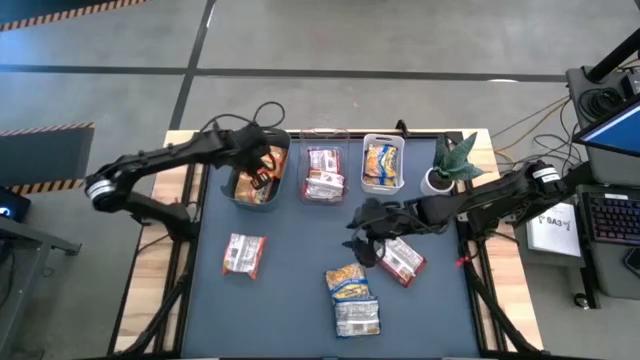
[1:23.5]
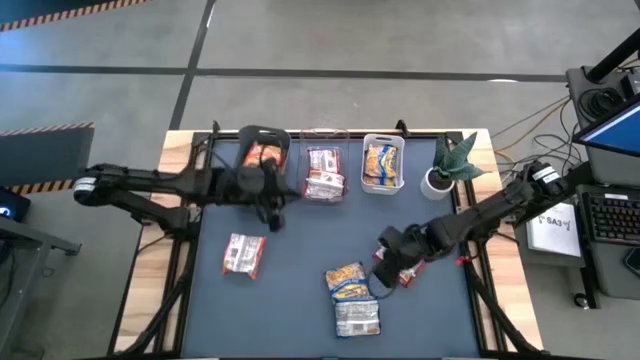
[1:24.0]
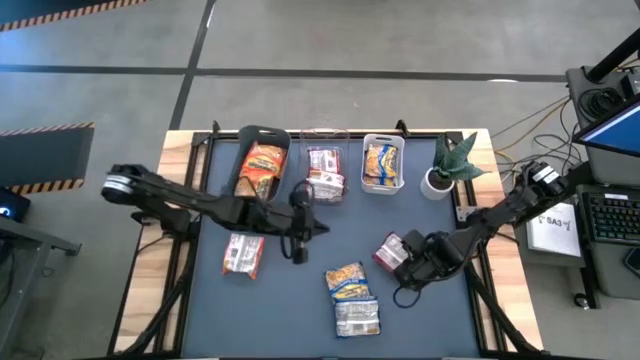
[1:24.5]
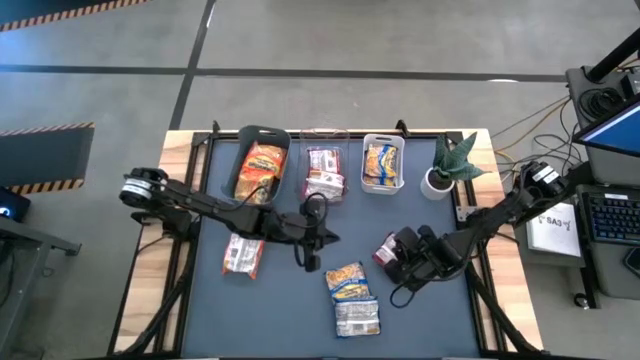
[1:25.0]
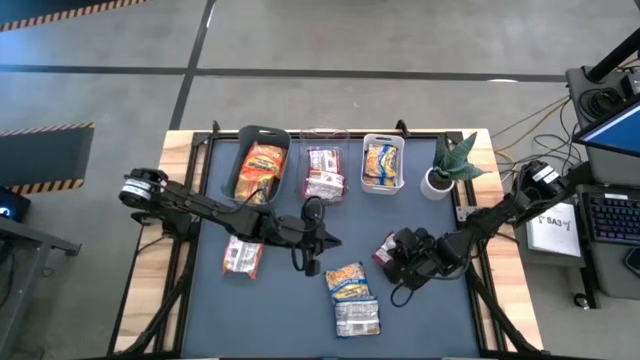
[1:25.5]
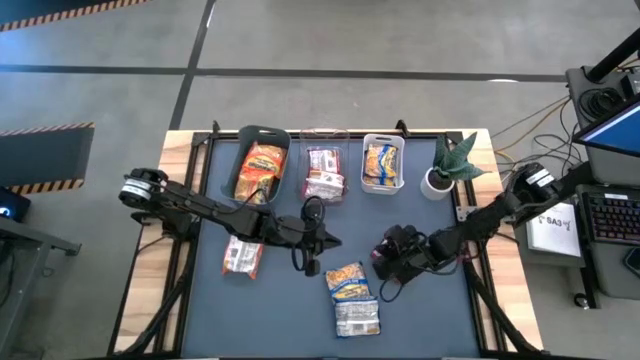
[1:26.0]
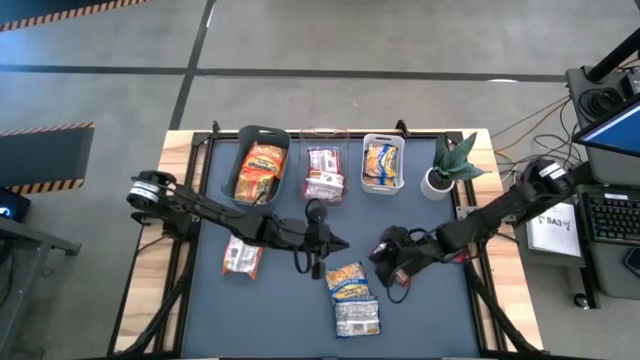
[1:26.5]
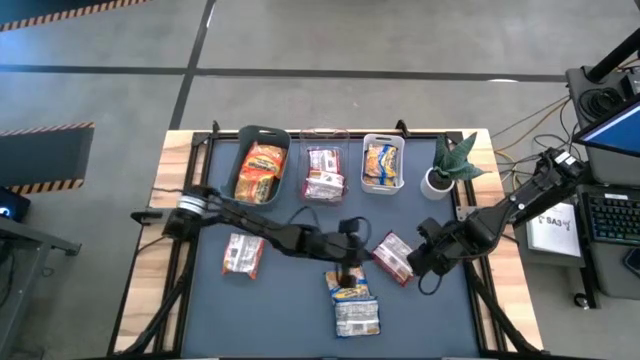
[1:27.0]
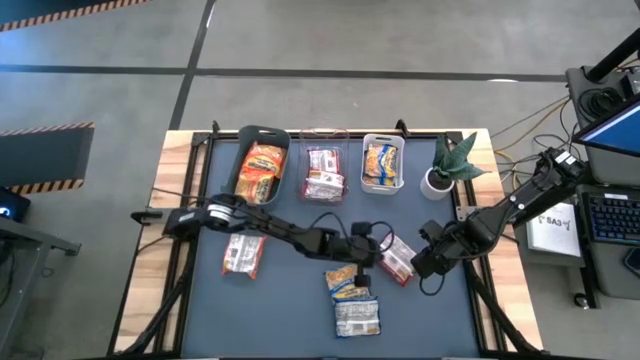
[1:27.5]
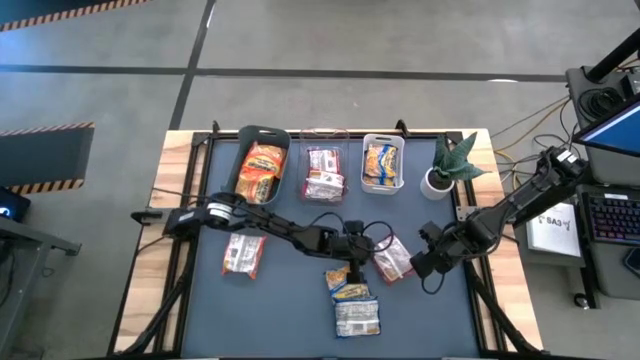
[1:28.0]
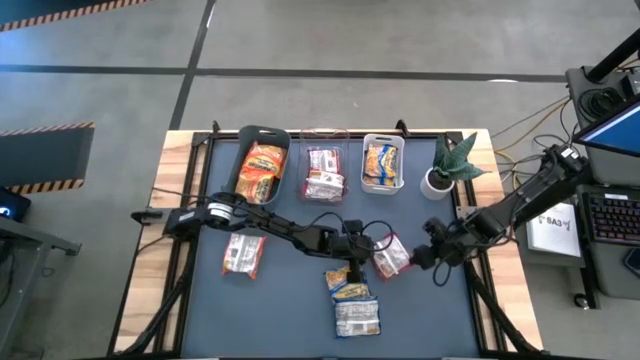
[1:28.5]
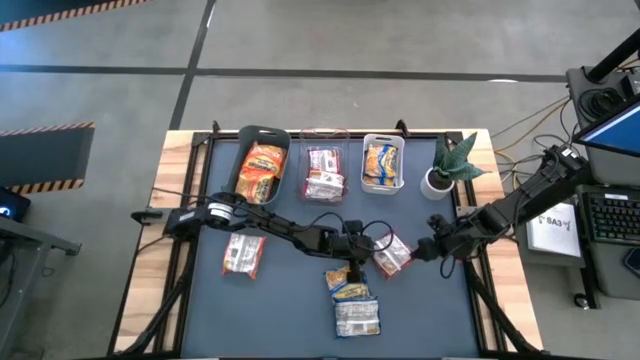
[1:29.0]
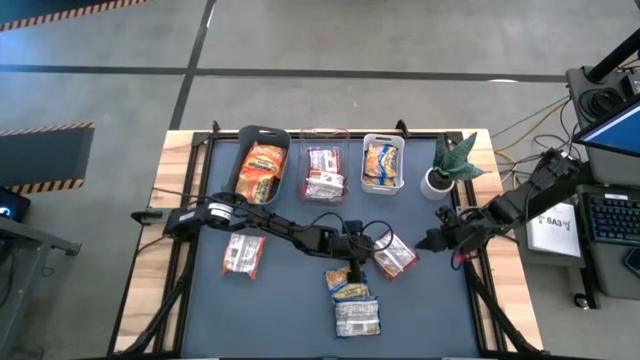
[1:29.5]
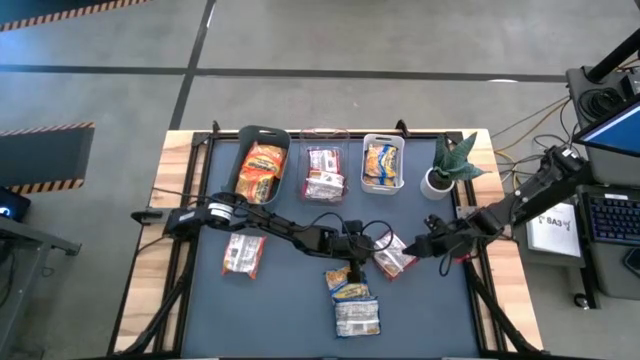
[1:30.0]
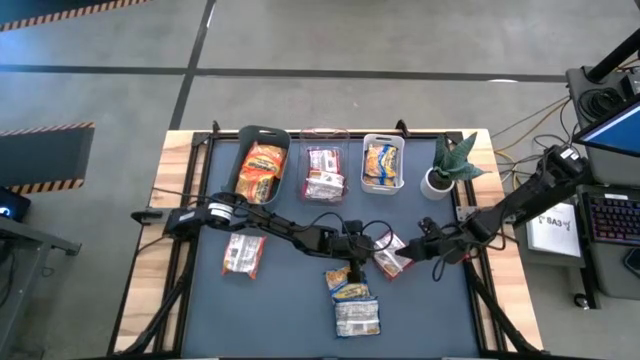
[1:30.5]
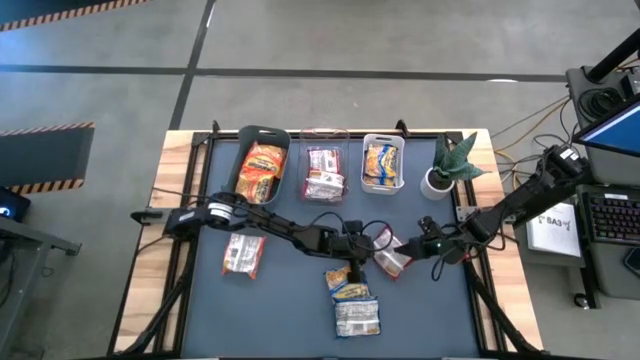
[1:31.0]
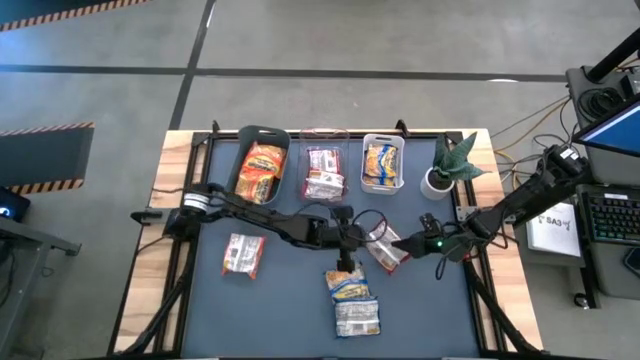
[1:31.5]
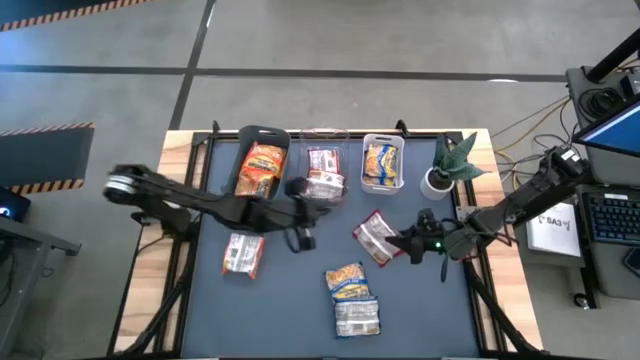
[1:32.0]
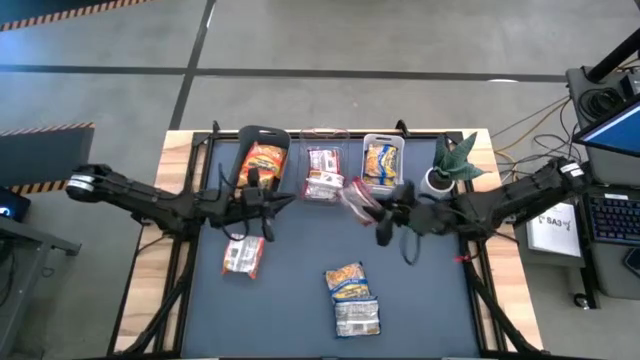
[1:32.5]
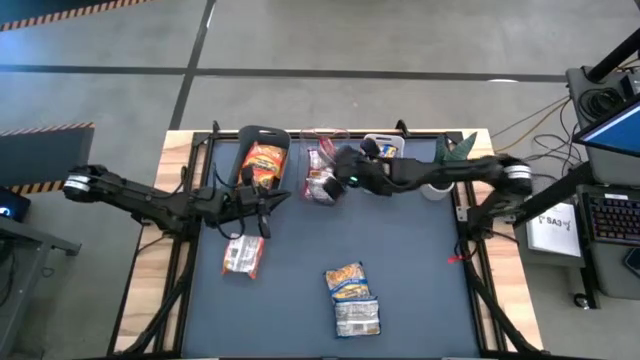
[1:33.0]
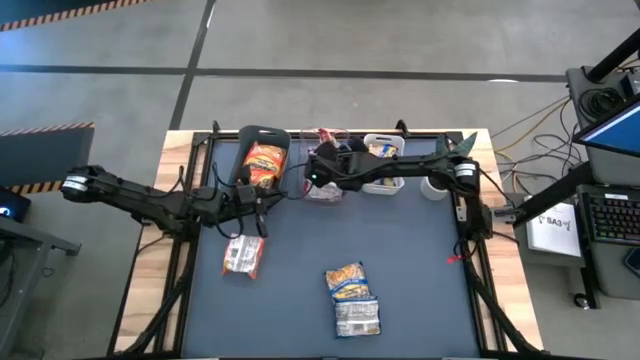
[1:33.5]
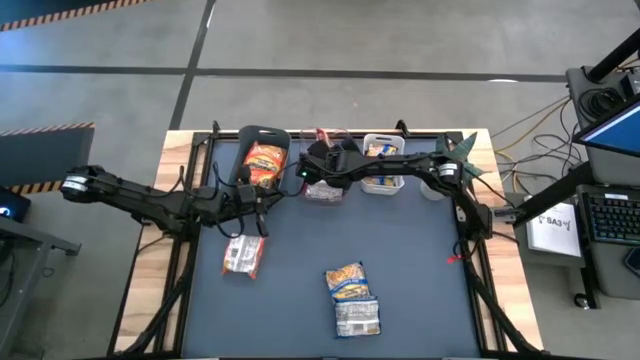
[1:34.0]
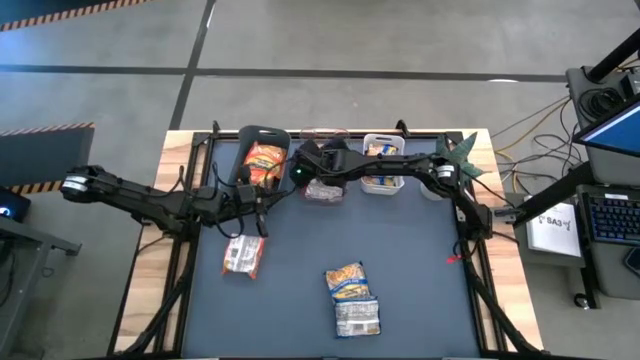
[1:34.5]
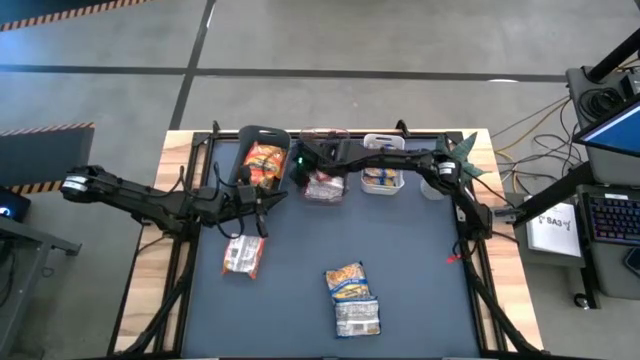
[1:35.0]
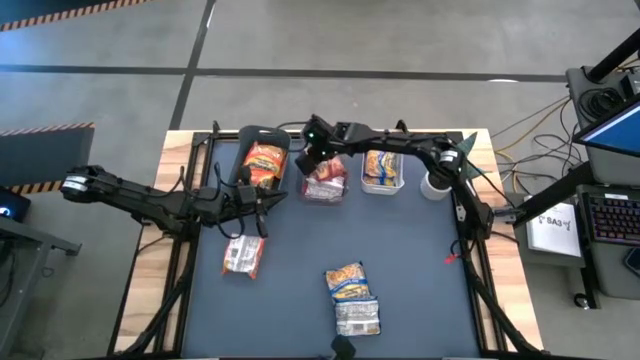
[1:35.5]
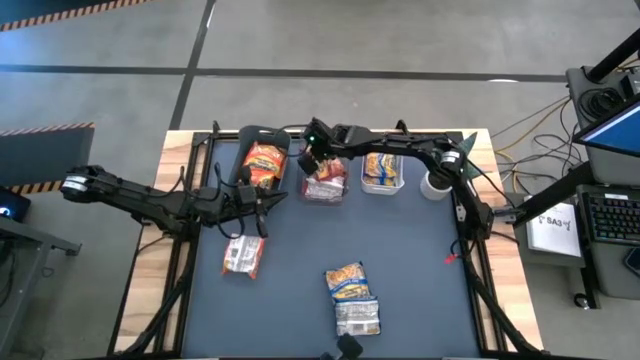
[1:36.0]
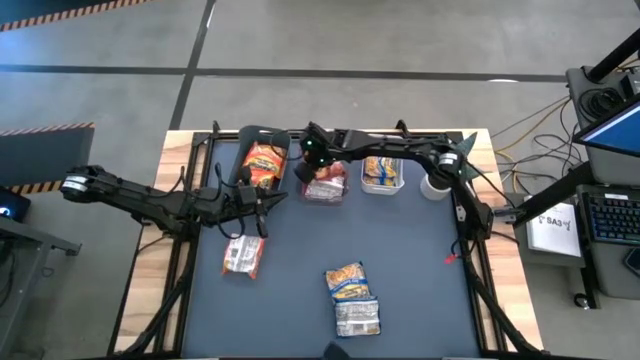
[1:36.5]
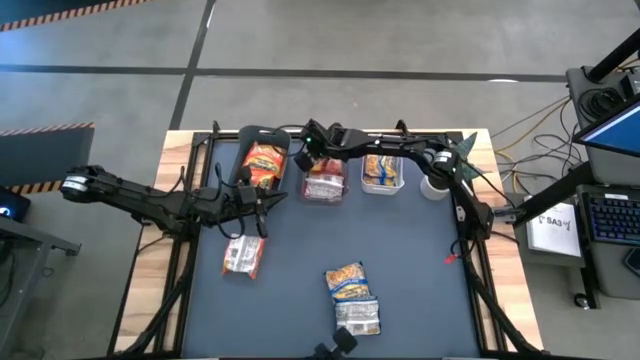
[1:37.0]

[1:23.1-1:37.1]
Task: Sort Maruchan noodles
Put the red noodle pack into the transparent bin

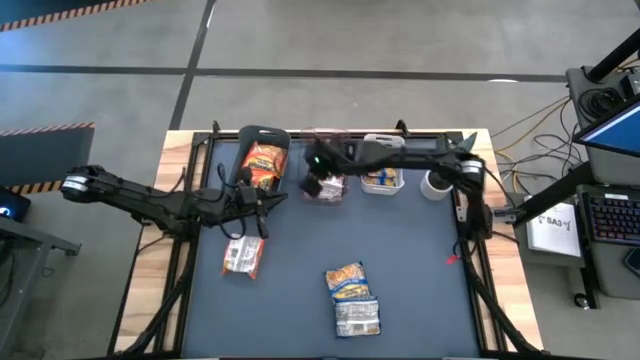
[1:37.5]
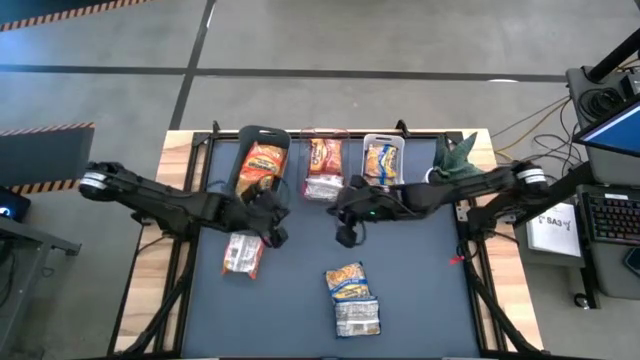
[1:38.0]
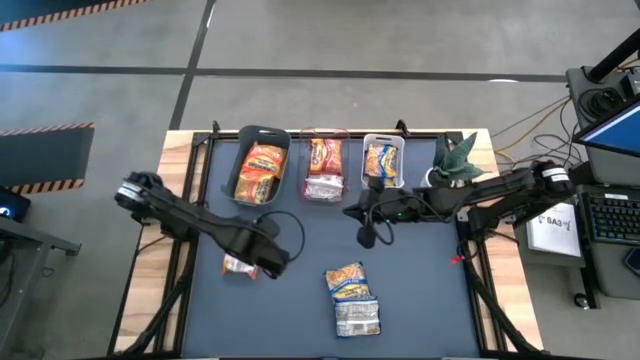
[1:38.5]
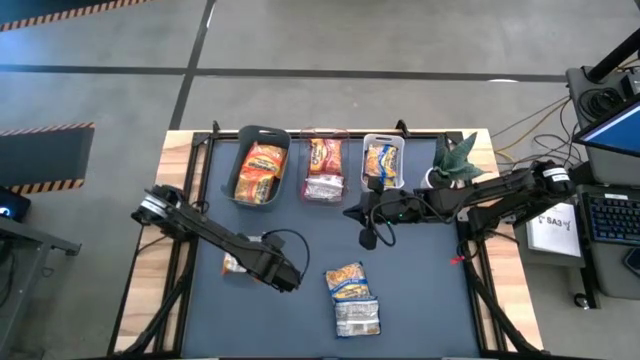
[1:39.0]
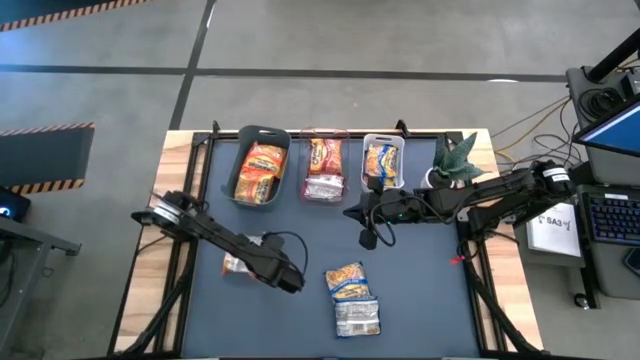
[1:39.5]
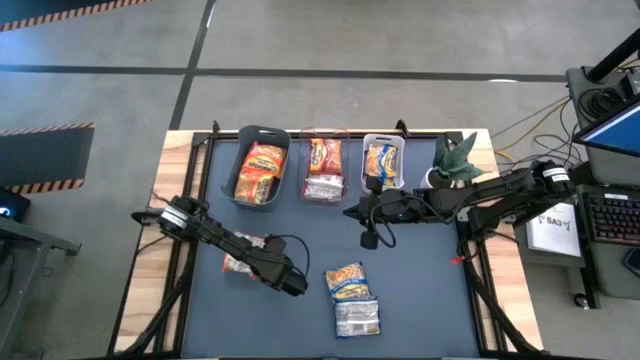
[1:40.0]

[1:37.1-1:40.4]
Put the orange noodle pack into the dark green bin
